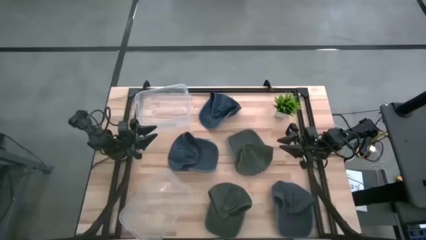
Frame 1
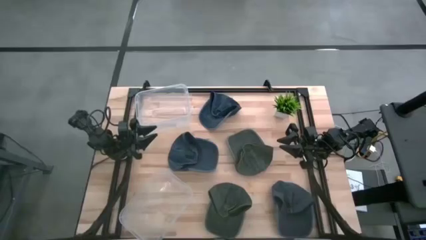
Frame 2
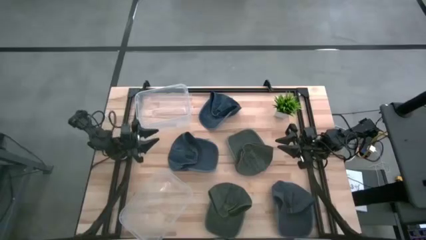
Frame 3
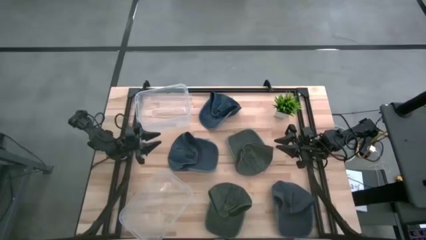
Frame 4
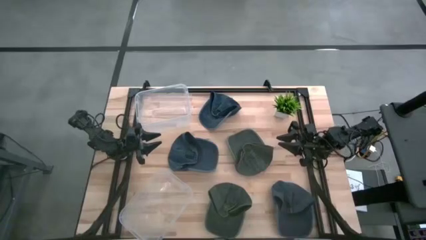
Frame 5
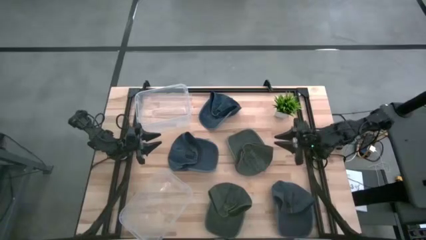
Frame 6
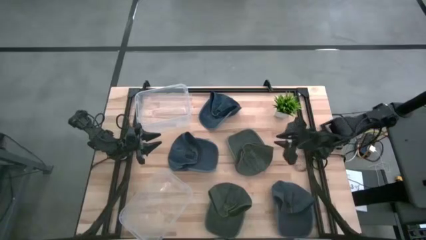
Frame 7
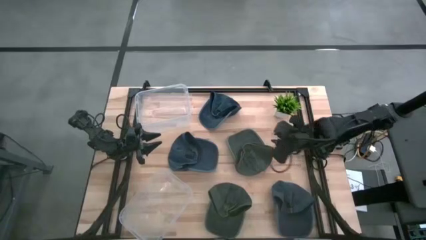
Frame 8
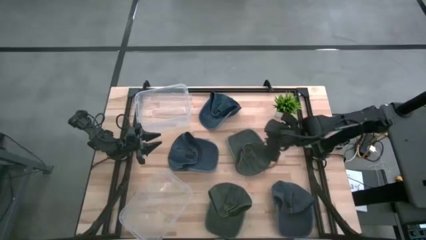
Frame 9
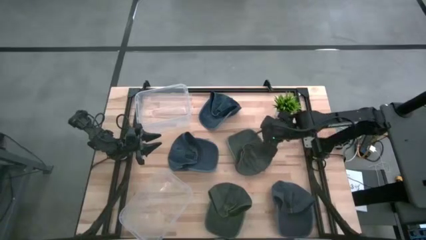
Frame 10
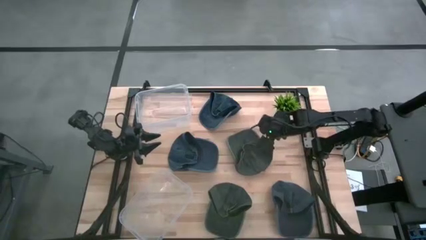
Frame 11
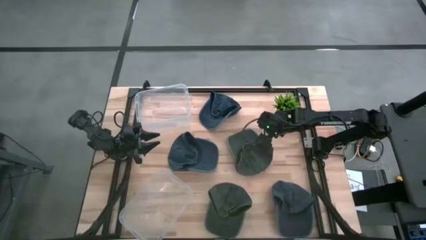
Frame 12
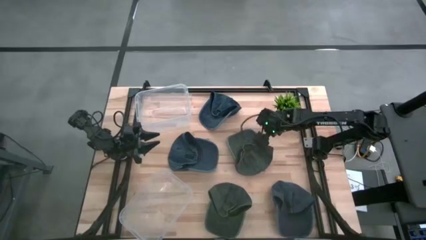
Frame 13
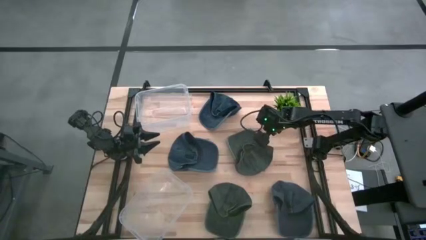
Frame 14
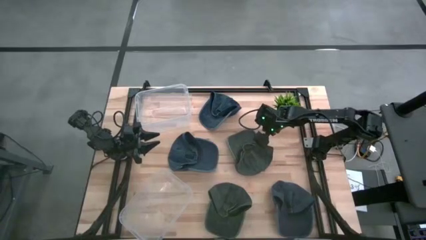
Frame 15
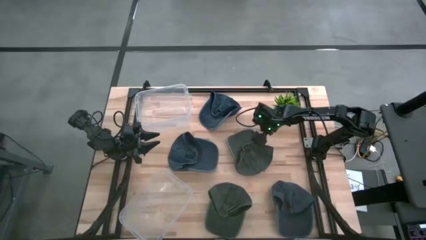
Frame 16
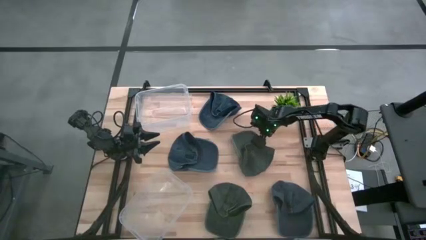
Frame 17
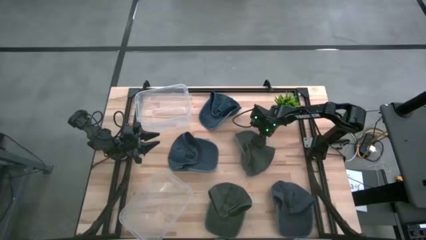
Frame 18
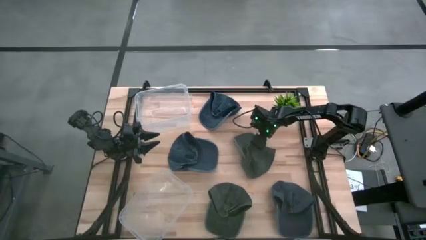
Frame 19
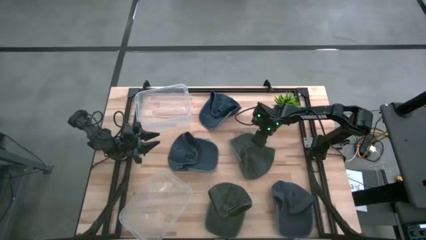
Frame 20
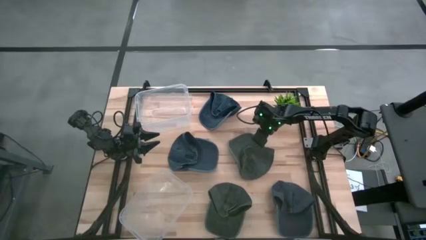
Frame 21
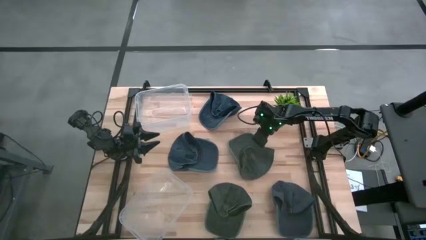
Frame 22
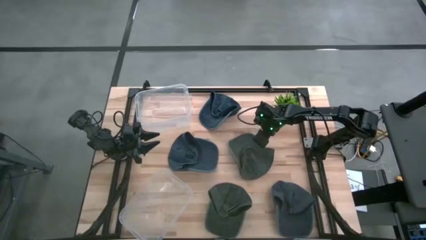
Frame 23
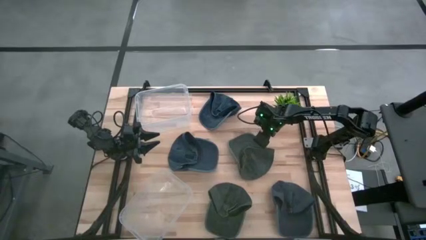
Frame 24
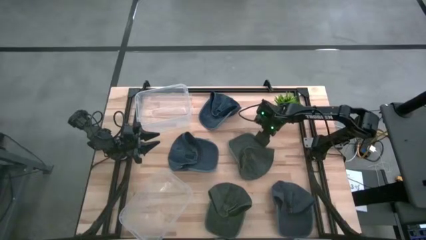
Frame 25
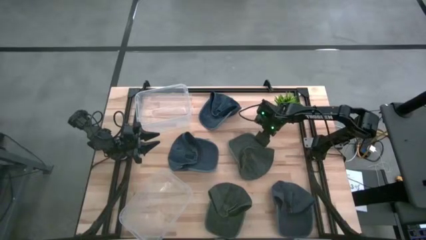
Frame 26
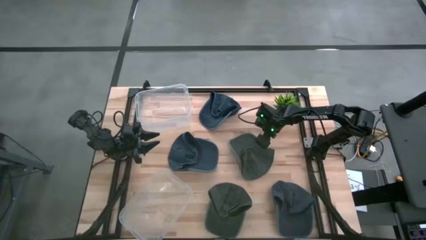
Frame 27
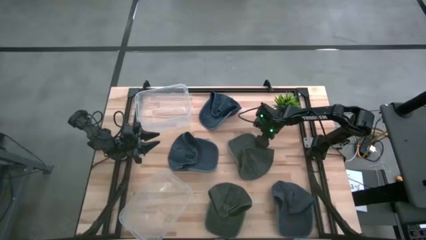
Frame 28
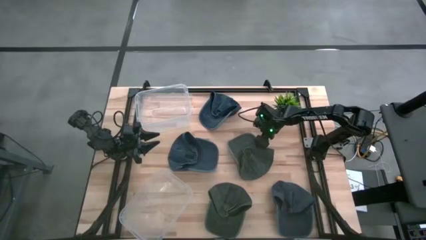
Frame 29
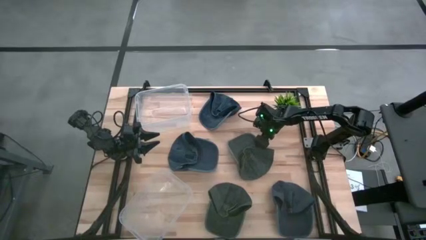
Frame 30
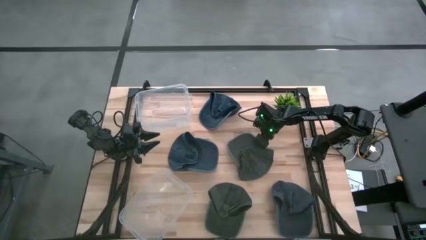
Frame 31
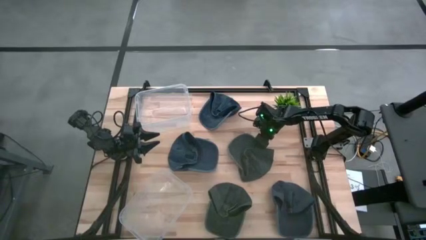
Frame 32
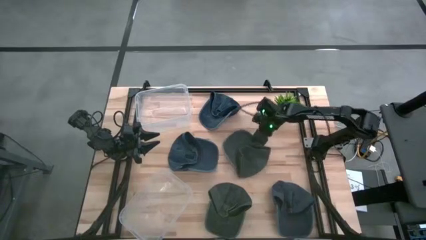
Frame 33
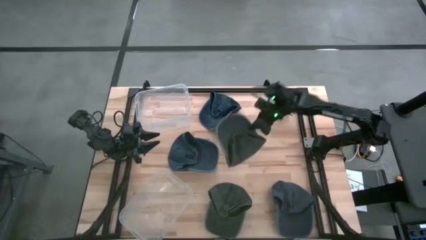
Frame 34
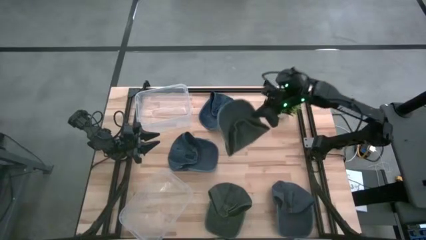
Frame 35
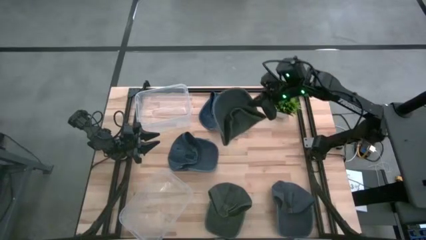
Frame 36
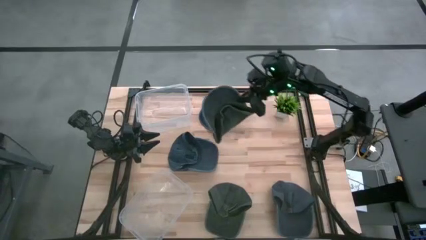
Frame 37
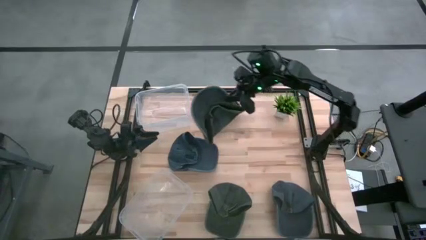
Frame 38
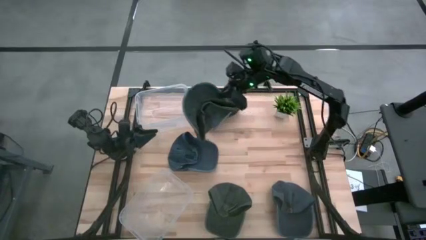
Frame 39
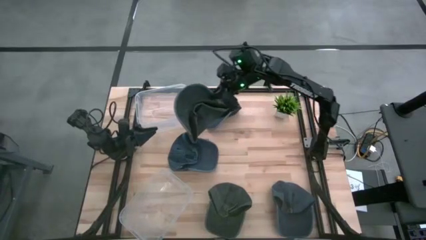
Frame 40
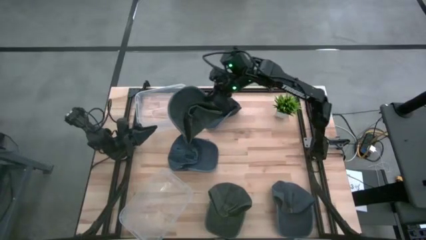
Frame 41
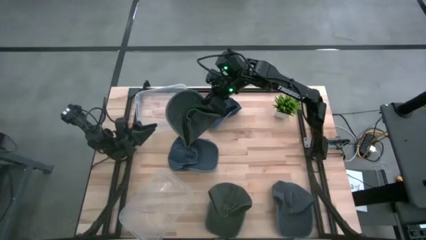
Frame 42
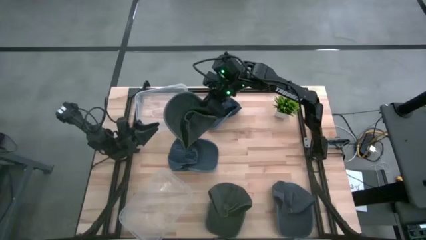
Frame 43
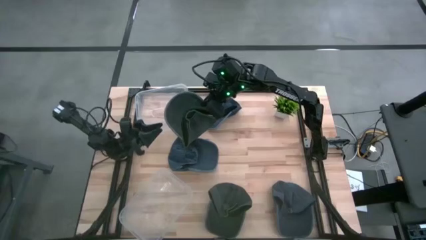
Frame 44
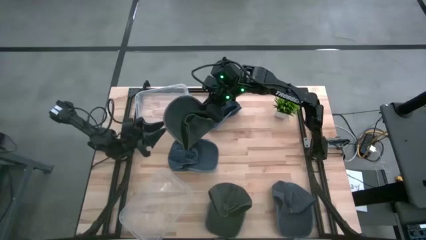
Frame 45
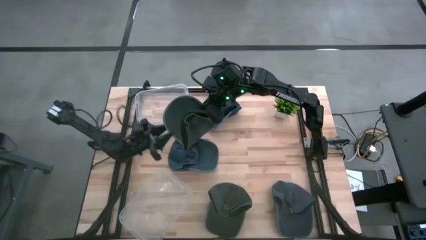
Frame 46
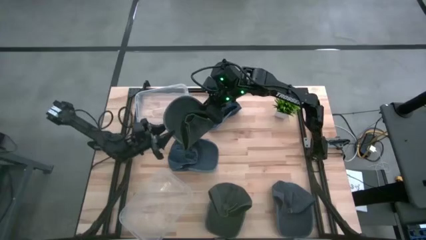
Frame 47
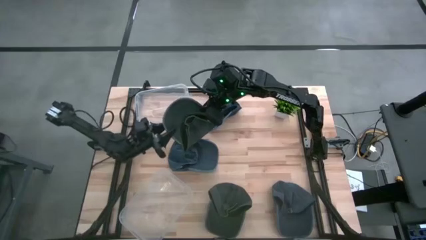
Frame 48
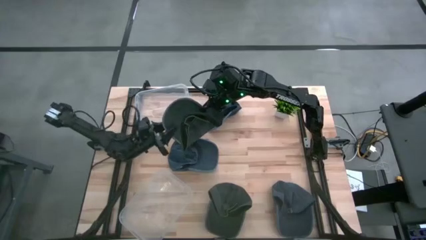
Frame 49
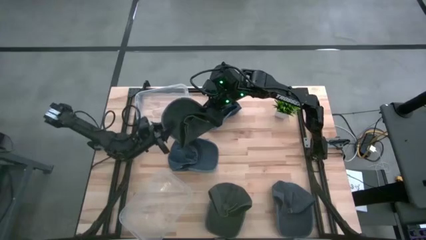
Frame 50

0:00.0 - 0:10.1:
Task: Pick & Place hat
Put the top gray cap into the top transparent bin
